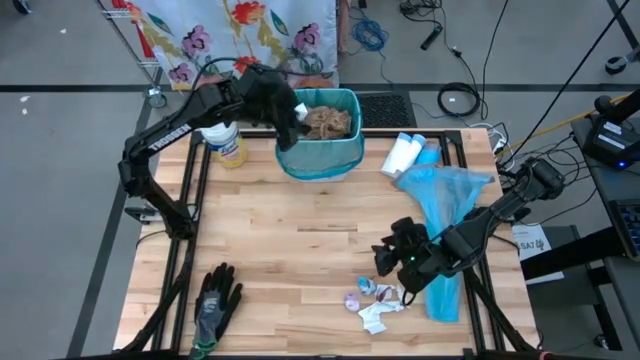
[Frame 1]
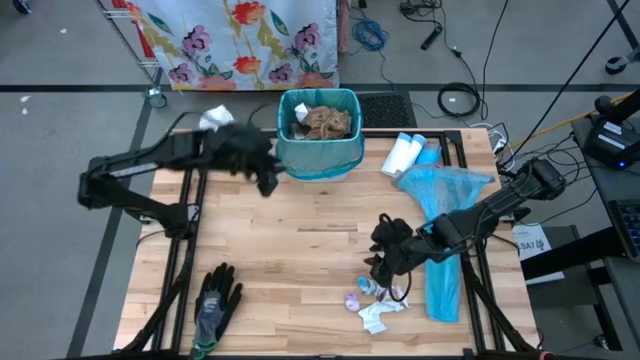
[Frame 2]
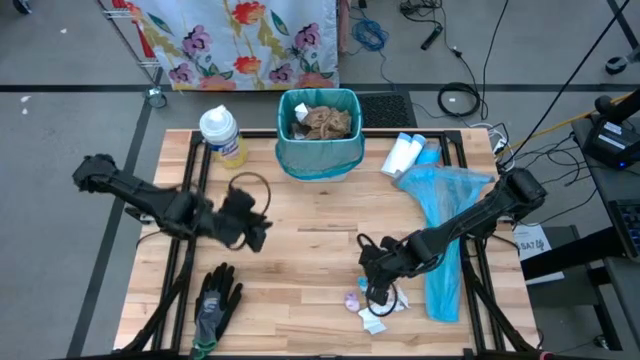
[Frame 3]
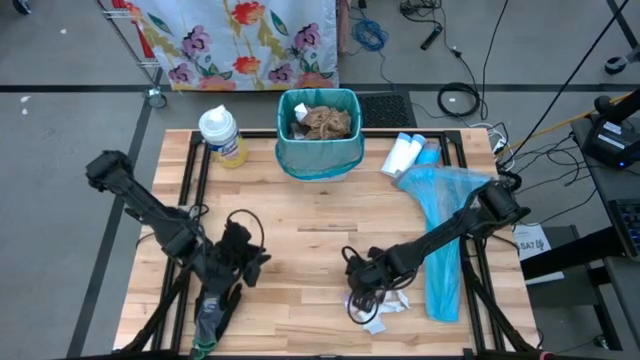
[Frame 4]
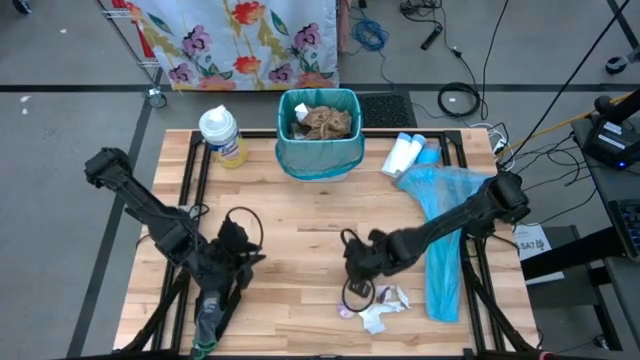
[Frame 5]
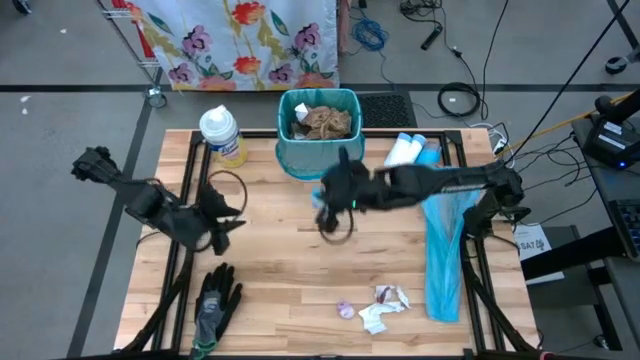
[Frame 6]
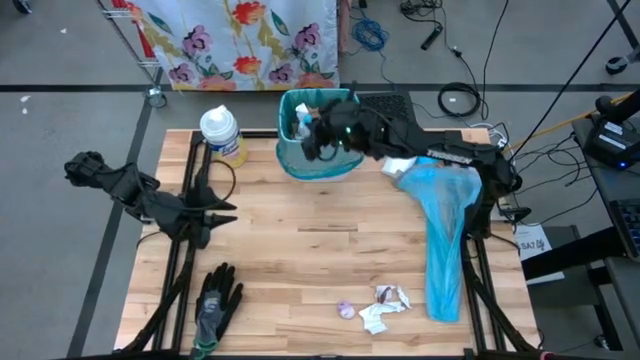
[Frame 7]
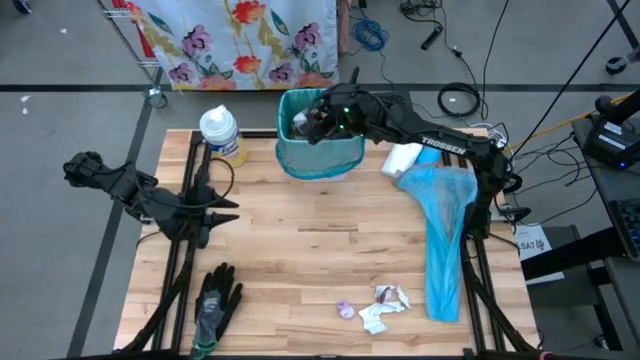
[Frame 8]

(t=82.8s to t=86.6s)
Task: place trash/remove bag and relplace
Put the blue-white bag into the white trash bin

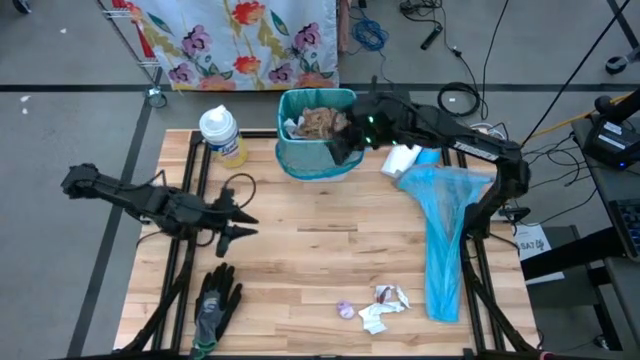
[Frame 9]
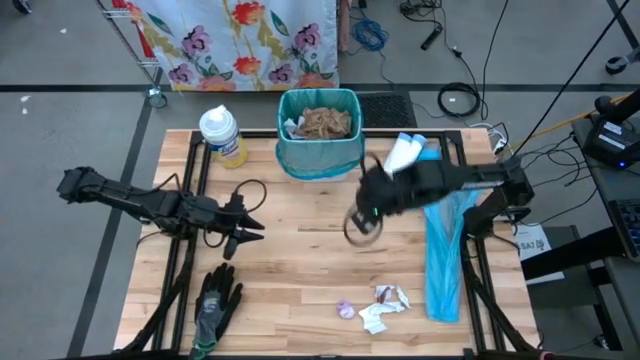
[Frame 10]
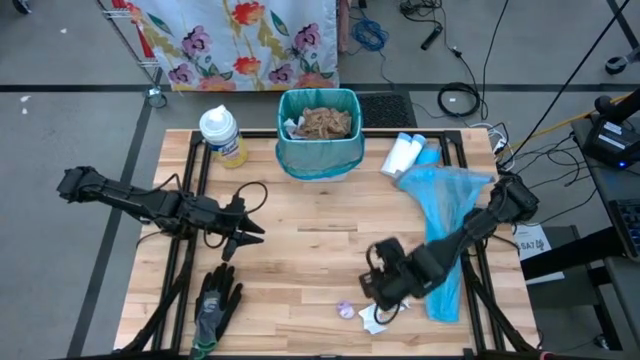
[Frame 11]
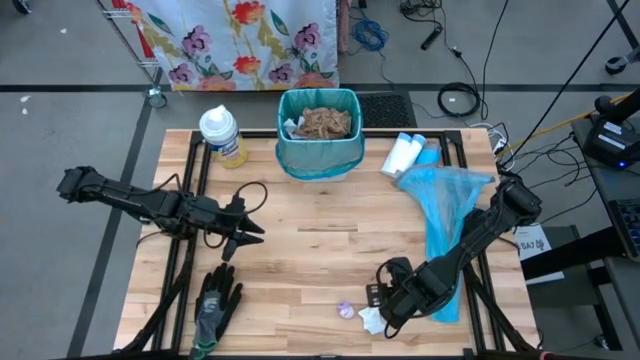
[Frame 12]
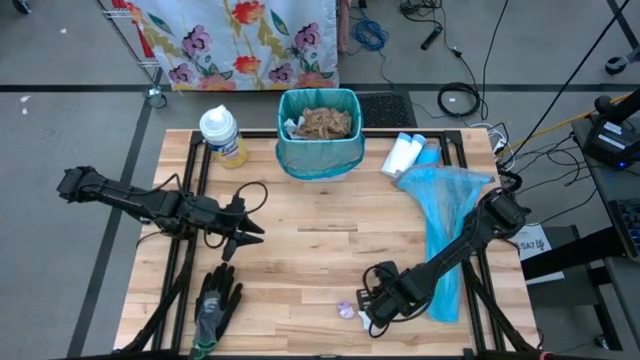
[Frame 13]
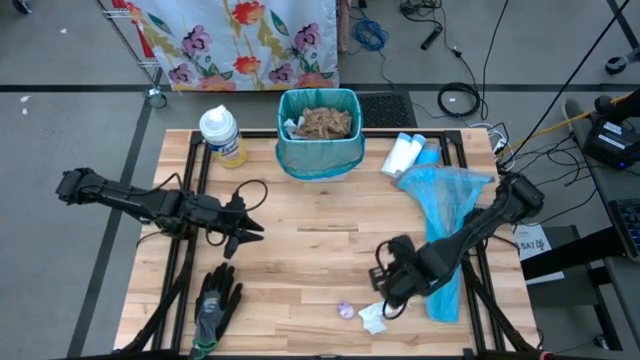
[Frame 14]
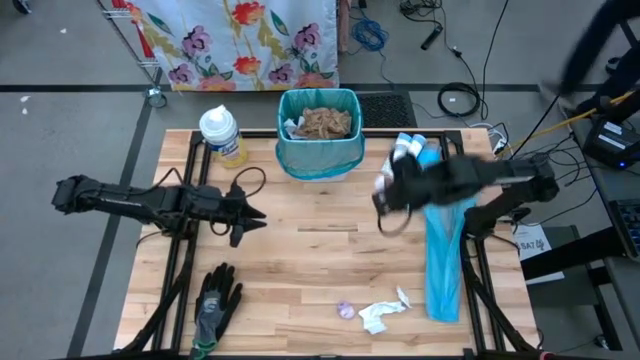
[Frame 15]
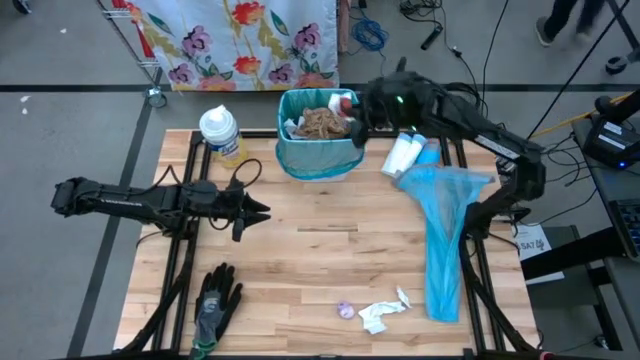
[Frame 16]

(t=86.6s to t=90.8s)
Put the white-orange paper into the white trash bin

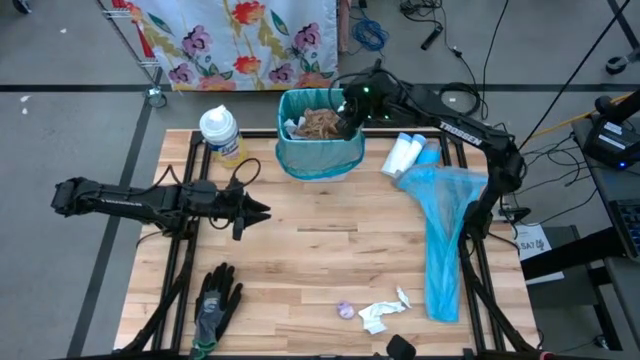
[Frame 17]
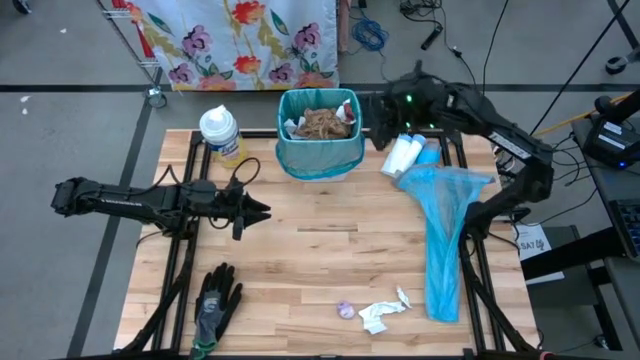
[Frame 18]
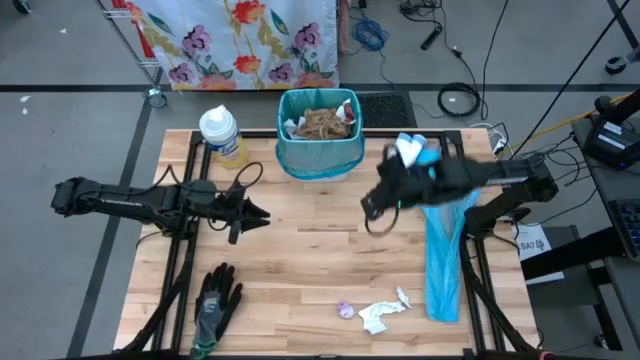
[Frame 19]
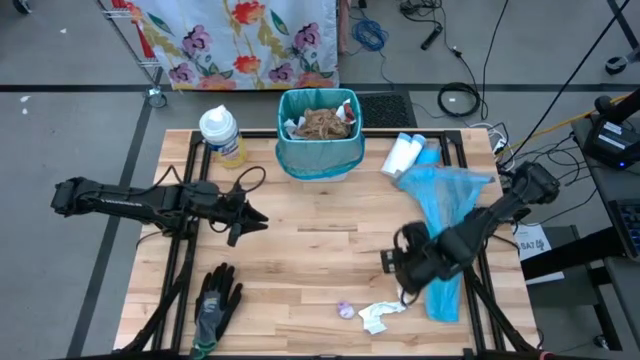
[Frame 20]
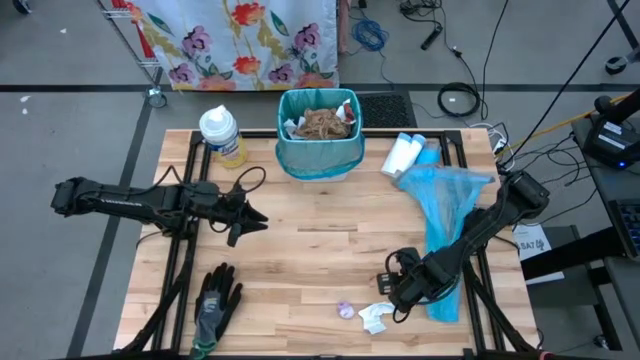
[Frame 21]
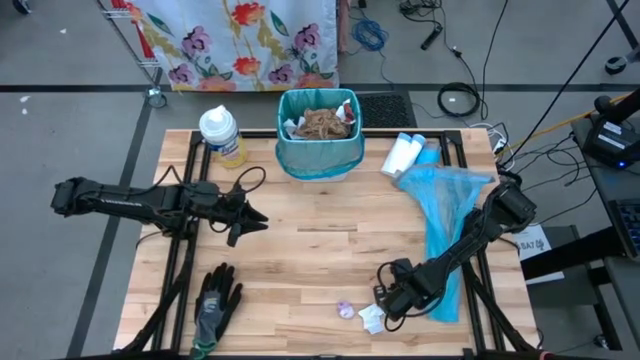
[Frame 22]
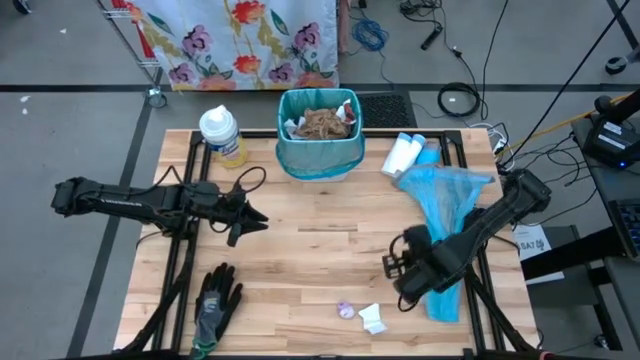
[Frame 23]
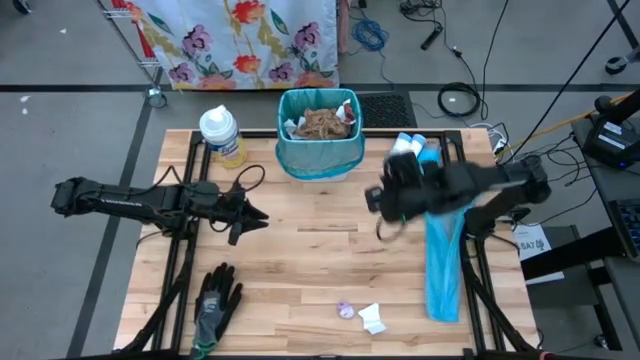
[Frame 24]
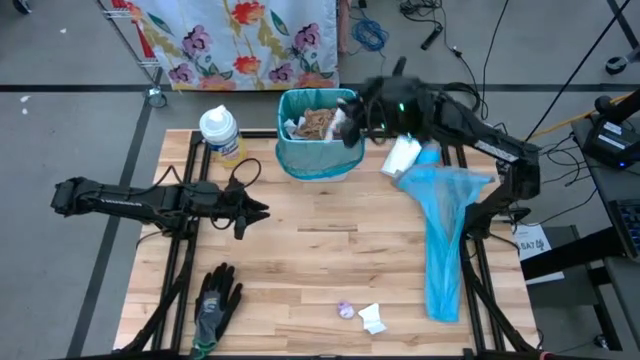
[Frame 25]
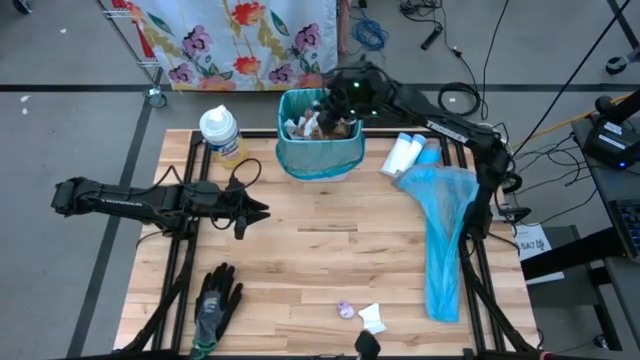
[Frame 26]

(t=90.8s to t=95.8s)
Put the white paper into the white trash bin

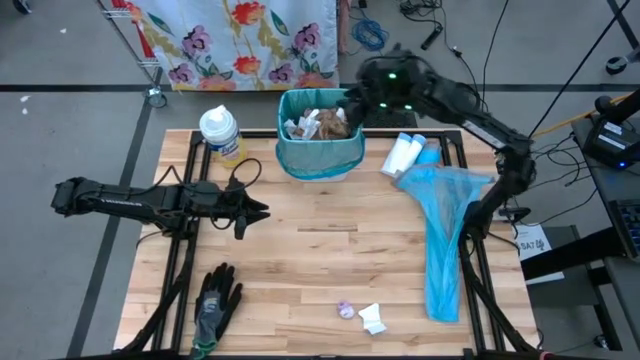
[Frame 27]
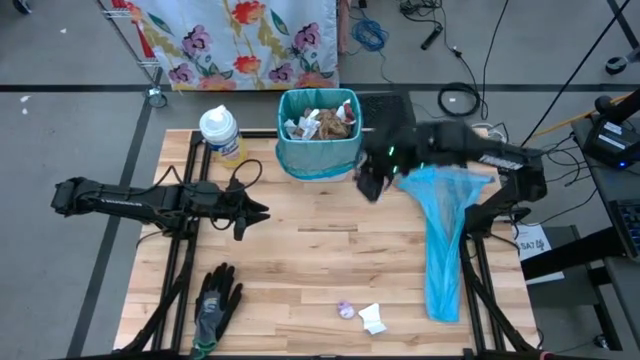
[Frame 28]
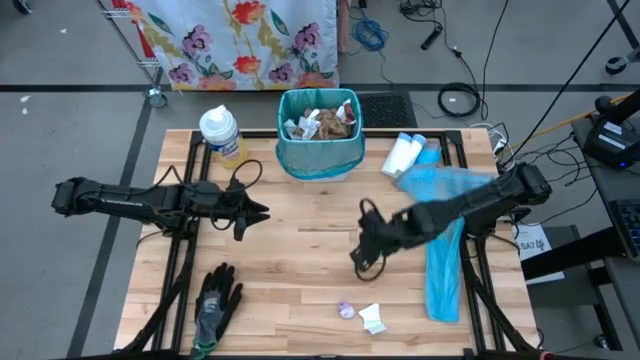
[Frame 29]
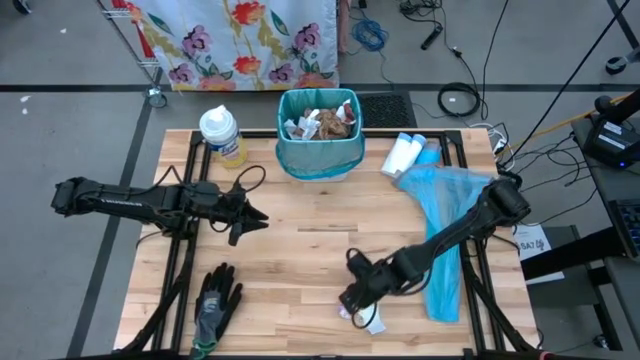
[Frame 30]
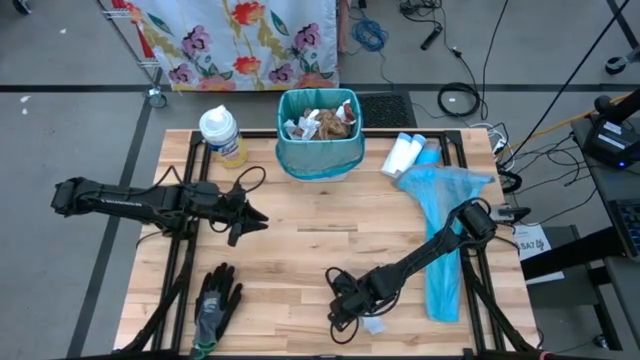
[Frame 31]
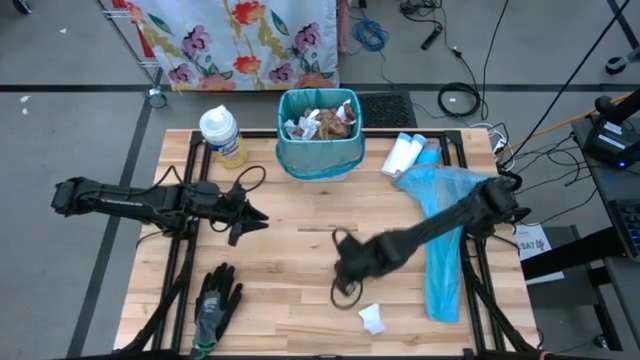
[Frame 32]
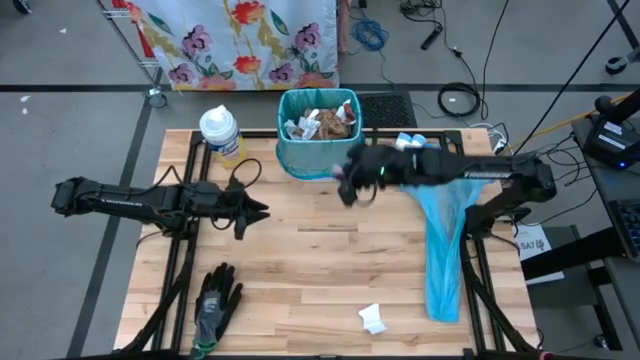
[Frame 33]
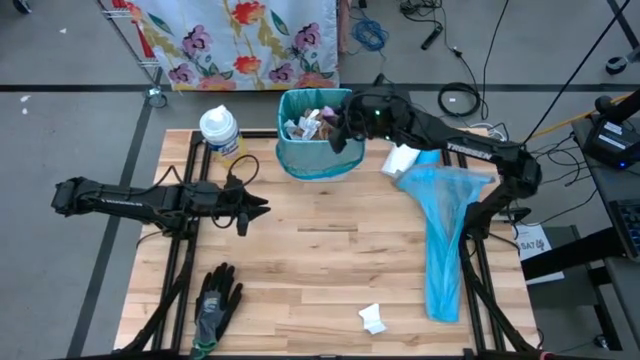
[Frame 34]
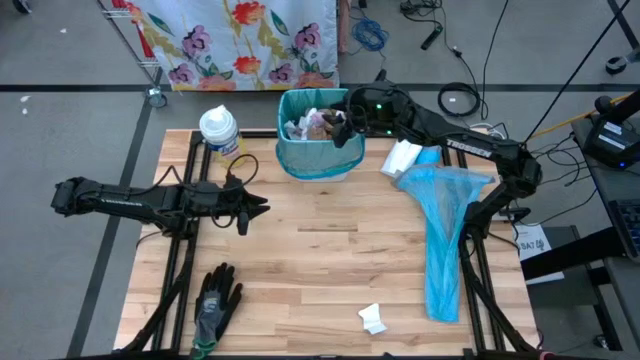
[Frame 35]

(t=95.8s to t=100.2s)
Put the pink-white bag into the white trash bin

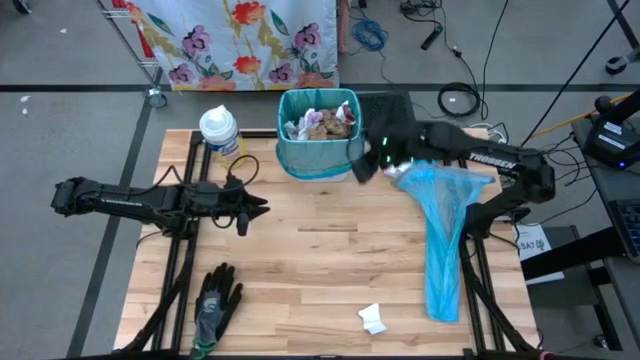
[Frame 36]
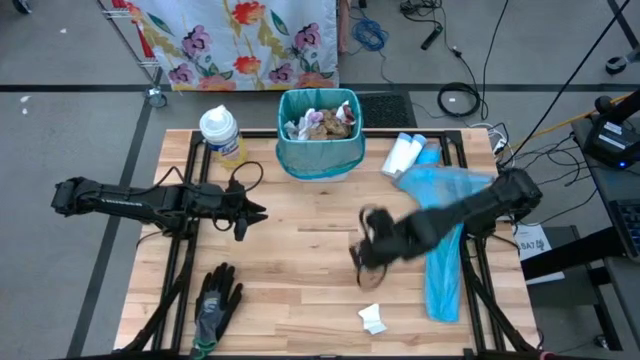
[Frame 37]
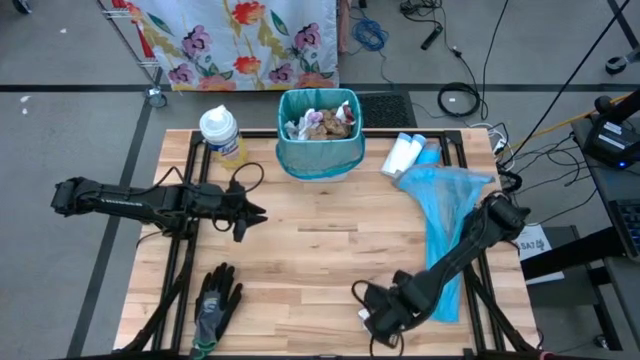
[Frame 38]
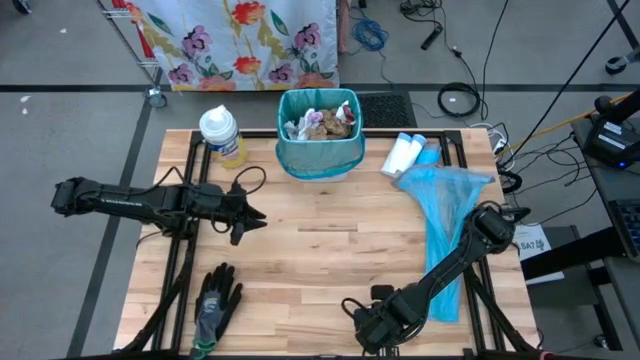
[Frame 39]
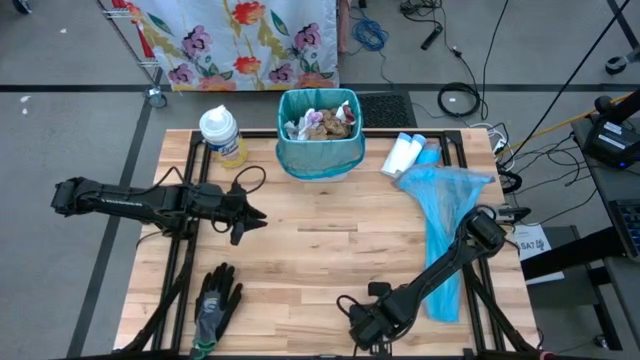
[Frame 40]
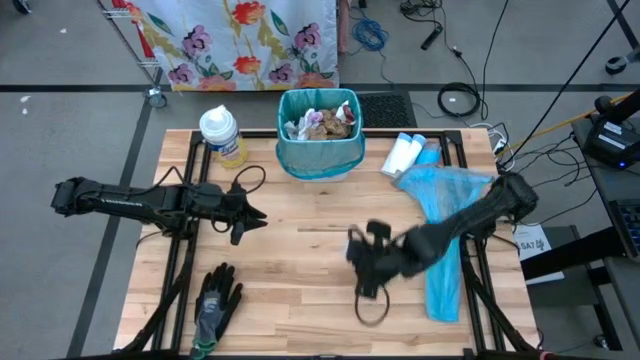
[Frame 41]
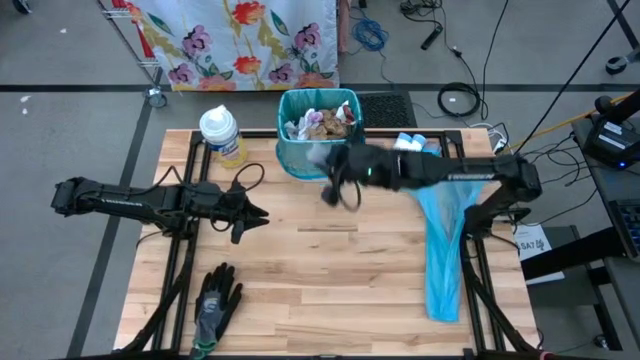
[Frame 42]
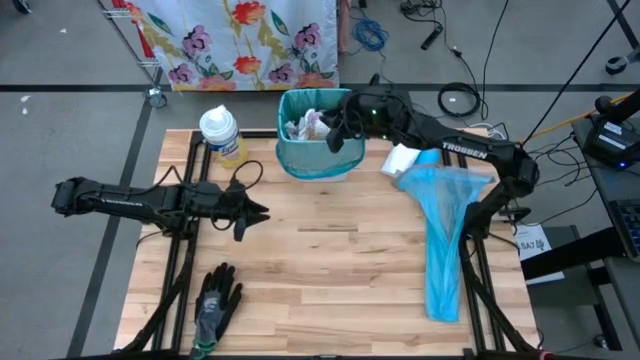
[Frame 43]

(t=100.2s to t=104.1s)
Put the white paper into the white trash bin
